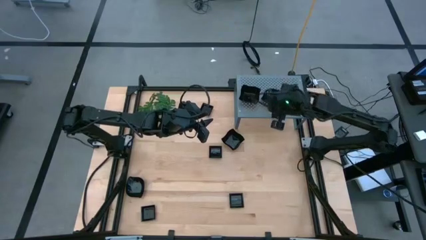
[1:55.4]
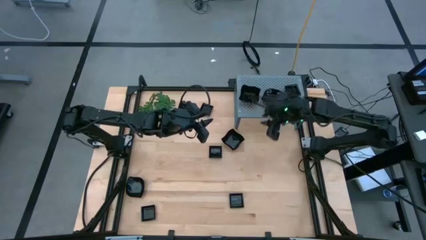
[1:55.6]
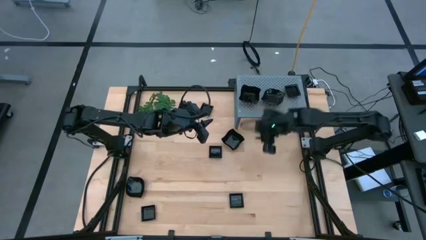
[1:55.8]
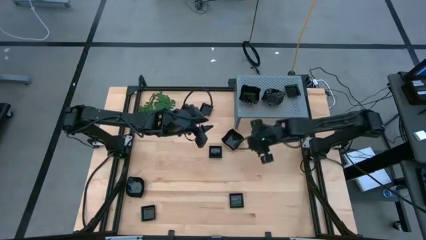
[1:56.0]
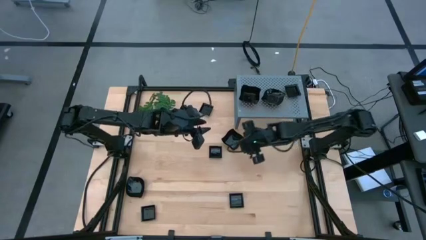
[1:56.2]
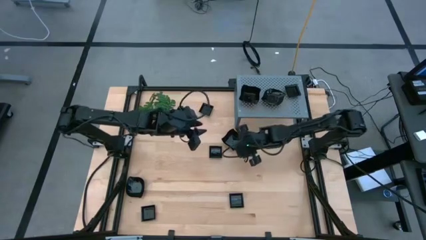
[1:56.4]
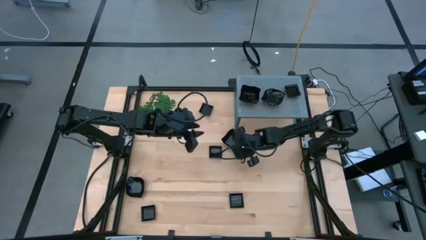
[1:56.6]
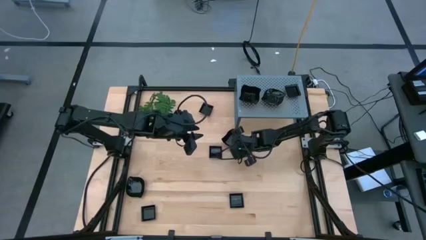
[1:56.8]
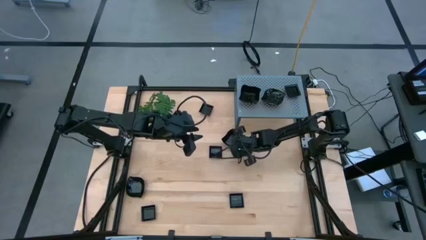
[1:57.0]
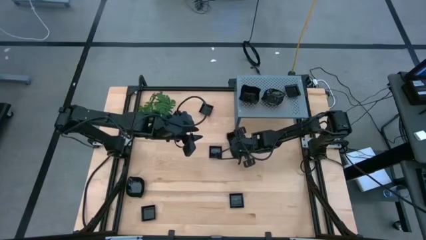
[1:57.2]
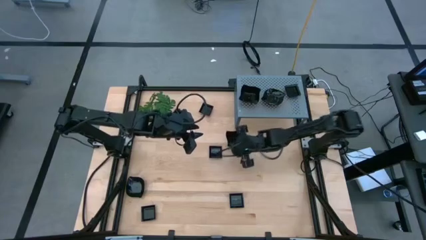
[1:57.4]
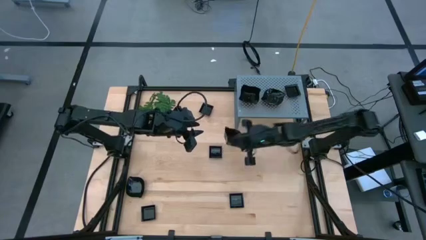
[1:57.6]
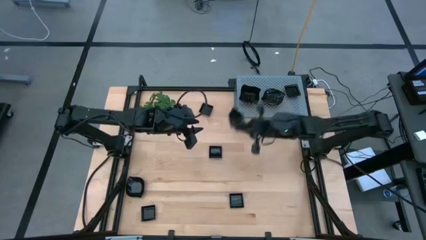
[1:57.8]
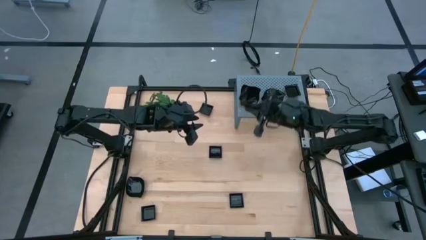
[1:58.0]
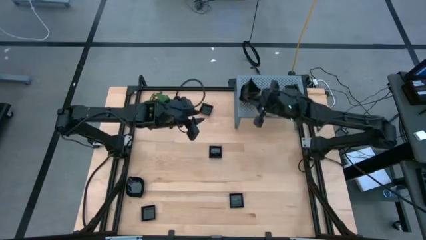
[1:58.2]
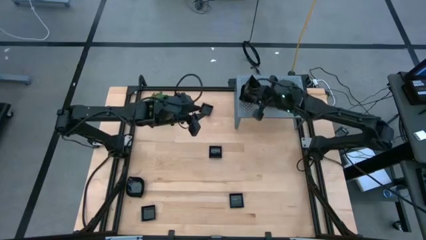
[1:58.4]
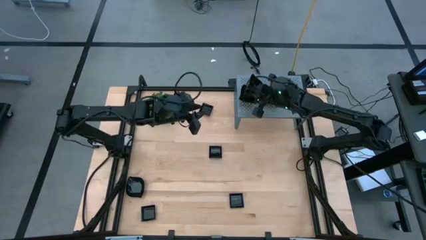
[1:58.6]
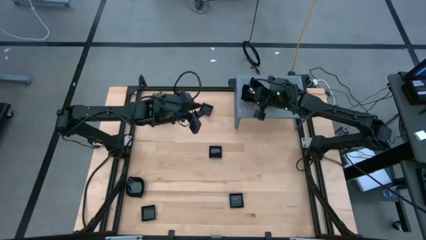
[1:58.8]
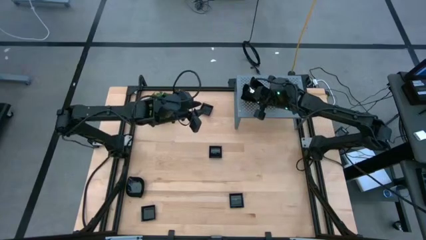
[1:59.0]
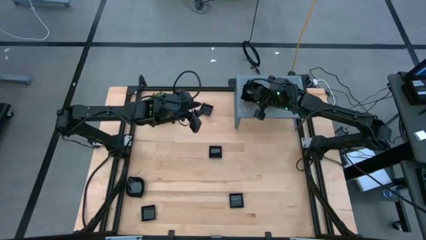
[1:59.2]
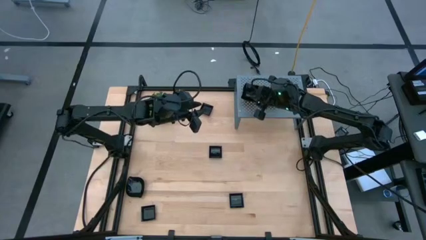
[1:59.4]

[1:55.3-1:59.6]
Task: Pick & Place Mini shaped plates
Stack the distorted square plate on top of the distorted square plates on the shelf

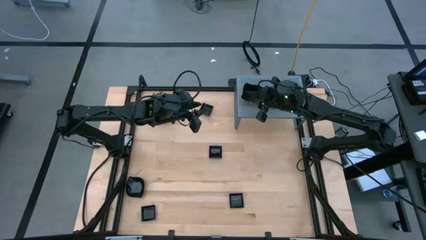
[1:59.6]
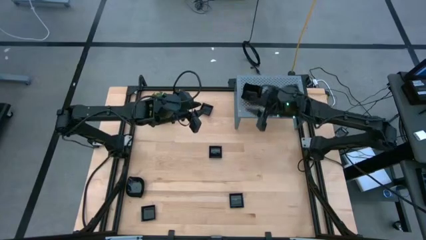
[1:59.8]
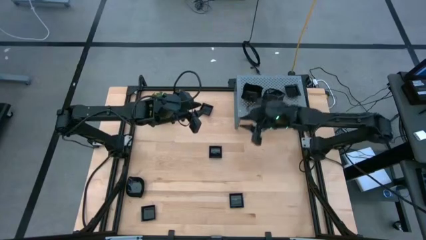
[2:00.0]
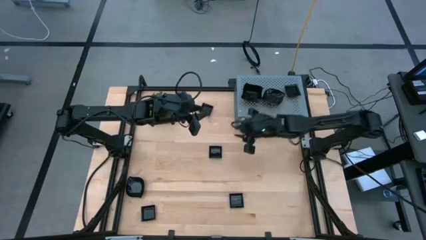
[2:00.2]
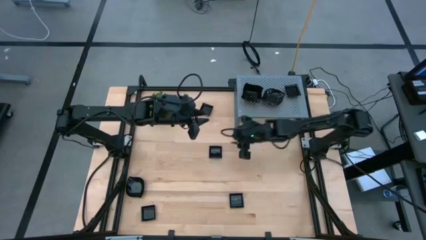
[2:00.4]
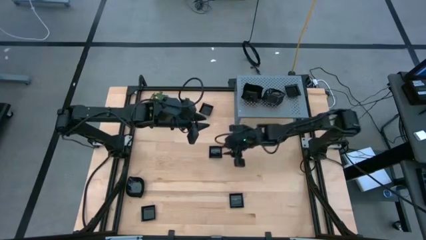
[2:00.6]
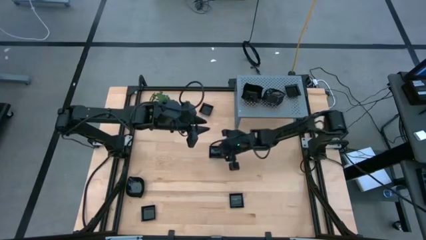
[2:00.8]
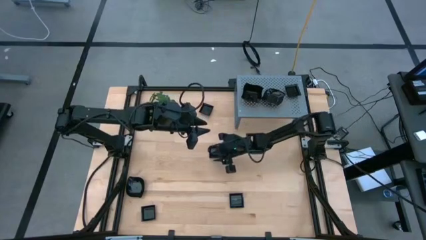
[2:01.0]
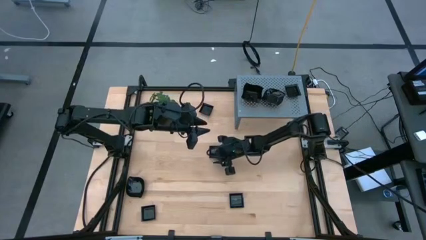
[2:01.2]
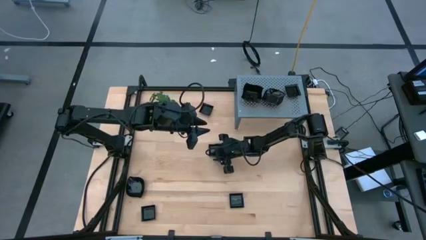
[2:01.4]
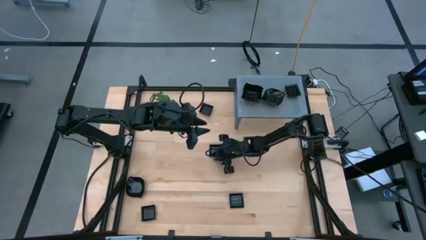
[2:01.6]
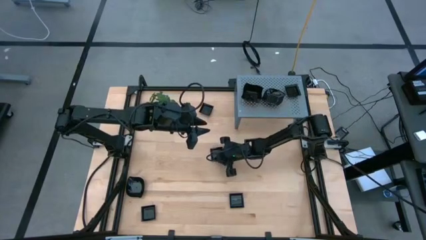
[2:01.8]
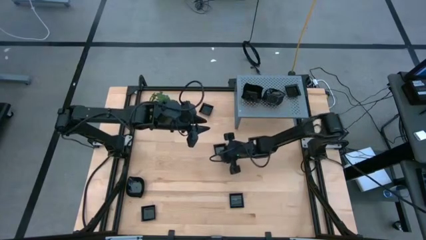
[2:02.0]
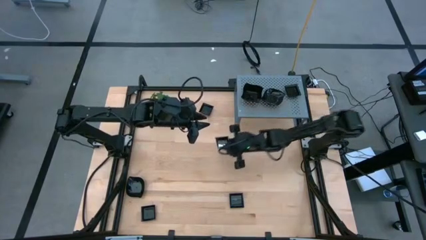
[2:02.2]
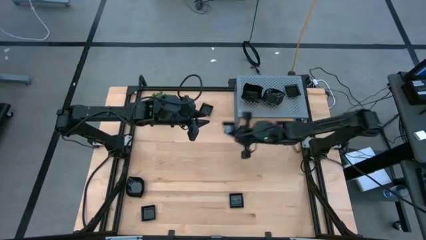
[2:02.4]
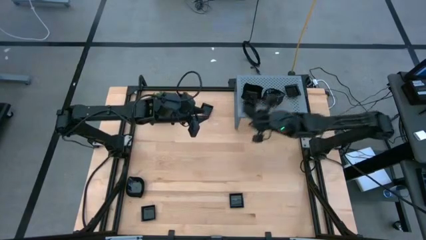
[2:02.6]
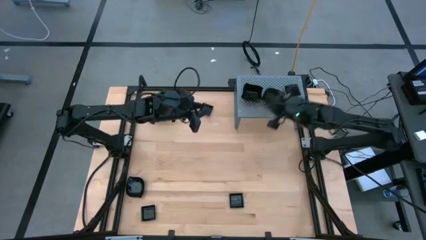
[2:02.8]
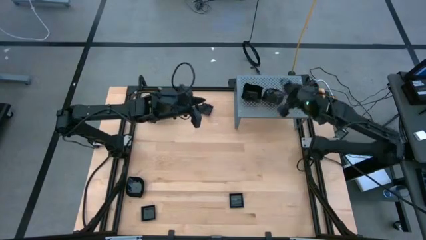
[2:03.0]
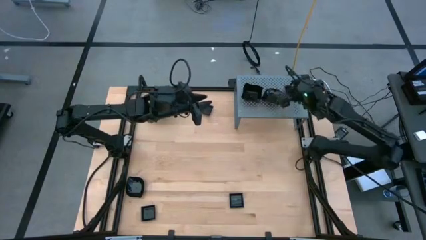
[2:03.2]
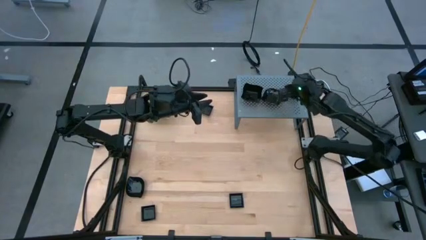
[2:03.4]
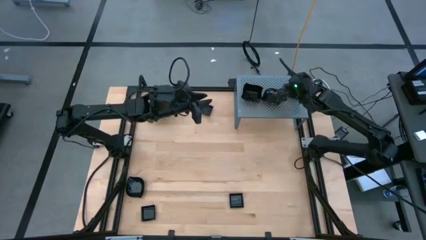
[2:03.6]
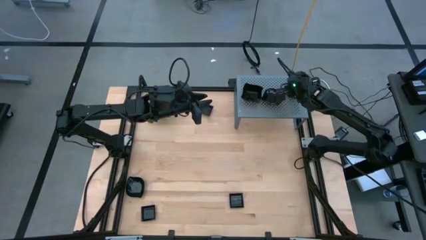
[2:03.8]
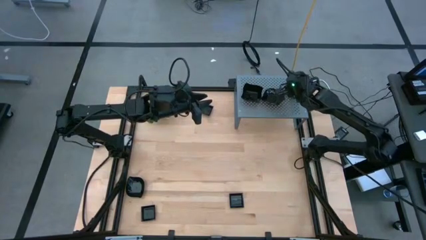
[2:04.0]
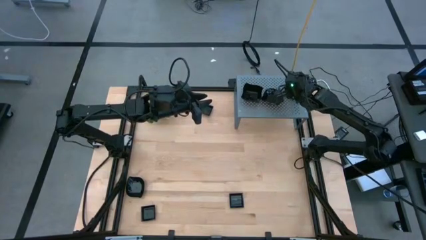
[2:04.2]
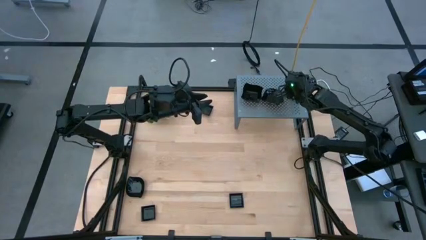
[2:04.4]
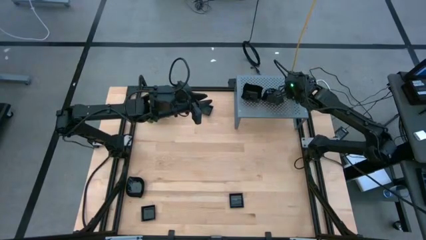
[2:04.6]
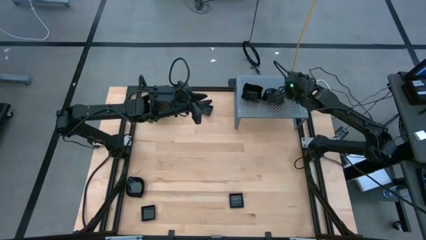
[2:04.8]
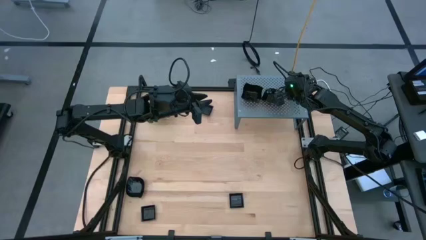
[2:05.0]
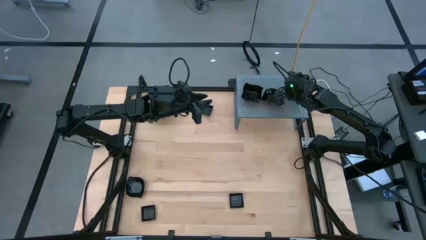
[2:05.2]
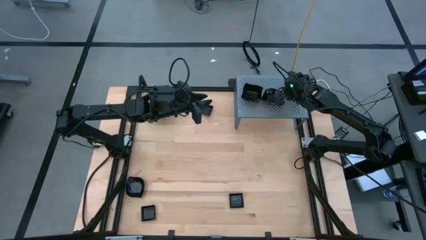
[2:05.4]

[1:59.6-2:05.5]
Stack the square plate on top of the square plates on the shelf
